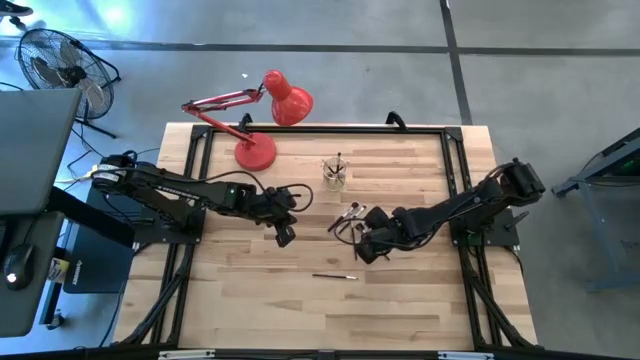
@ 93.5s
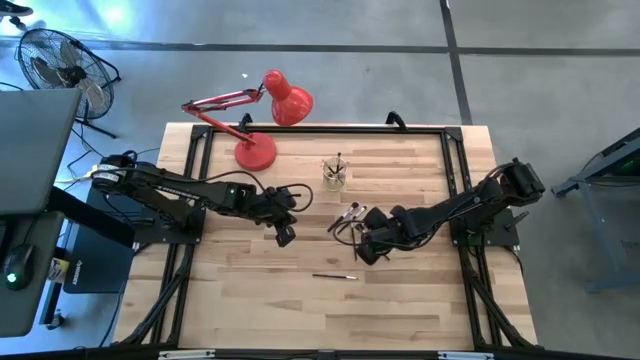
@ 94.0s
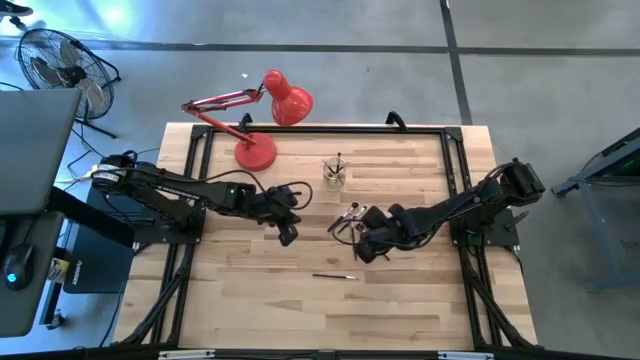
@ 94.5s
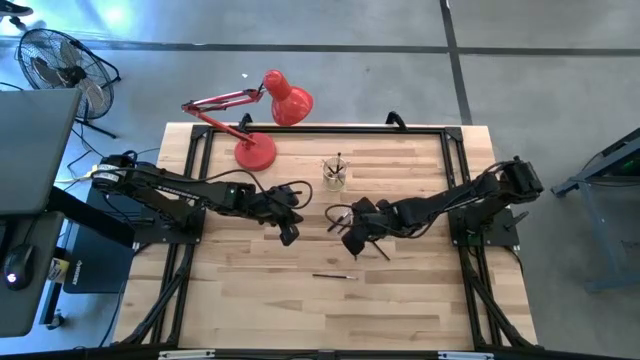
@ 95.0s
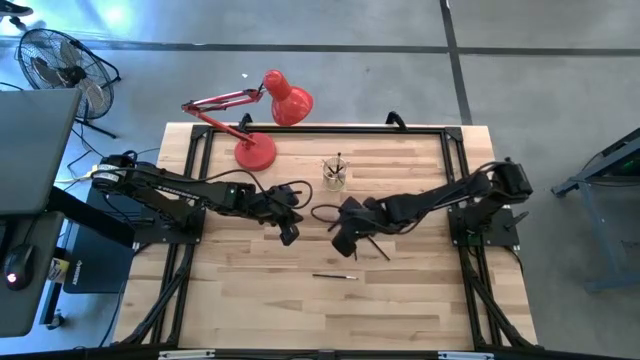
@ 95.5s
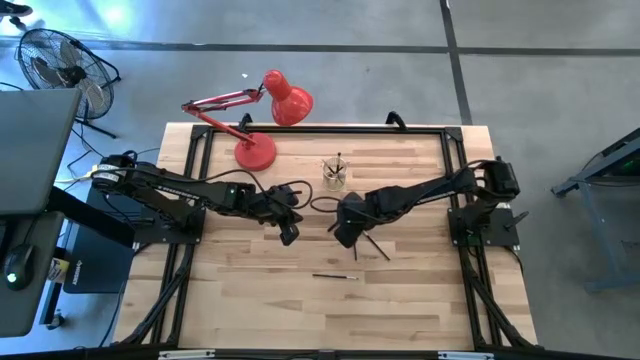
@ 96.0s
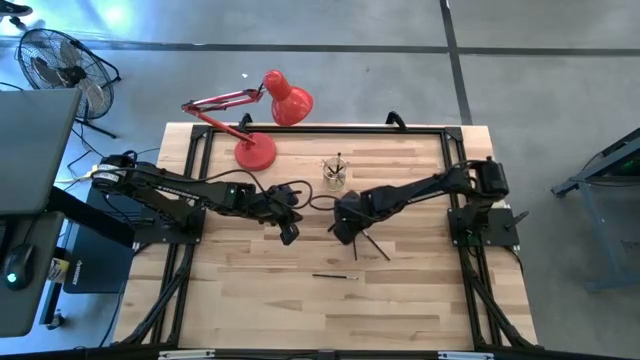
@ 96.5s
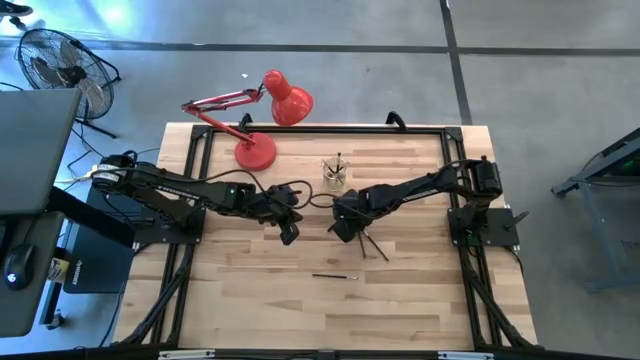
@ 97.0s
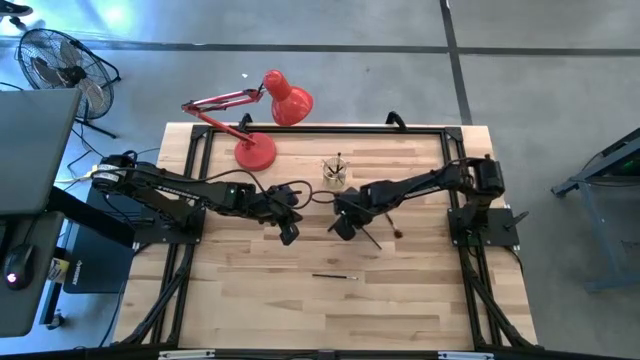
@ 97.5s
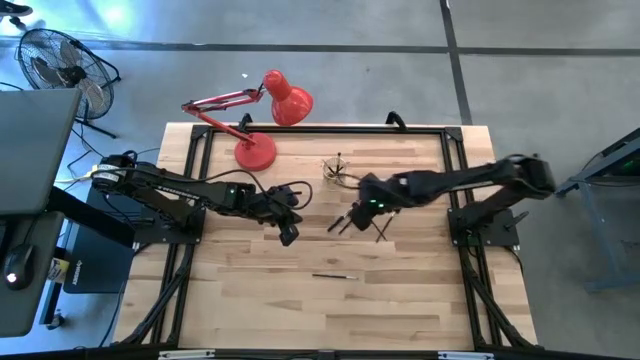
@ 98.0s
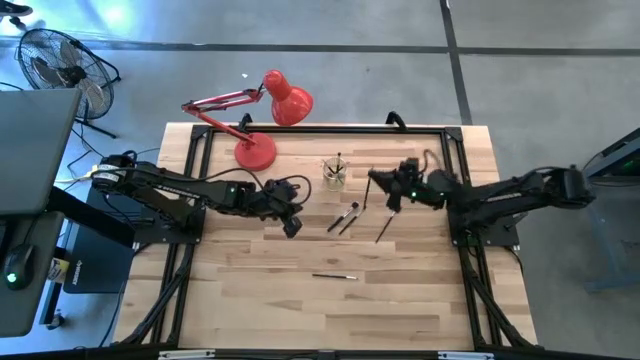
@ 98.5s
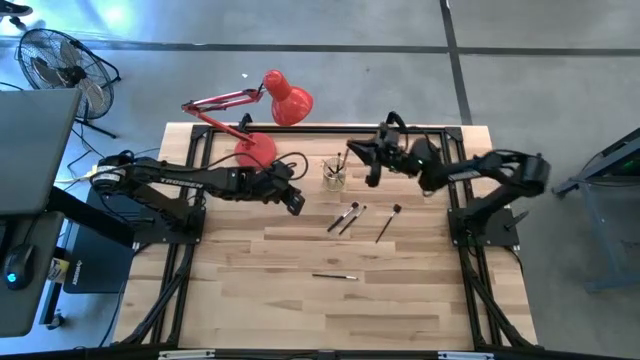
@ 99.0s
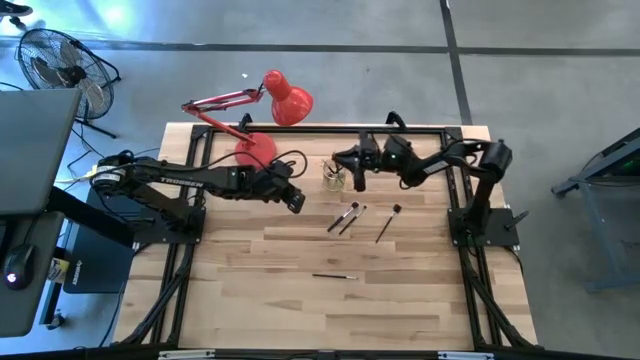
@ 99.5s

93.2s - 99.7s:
Task: Put items in baskets/containers
Put the makeup brush into the wire bin

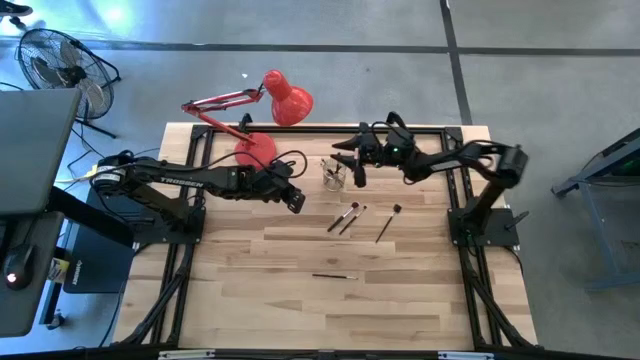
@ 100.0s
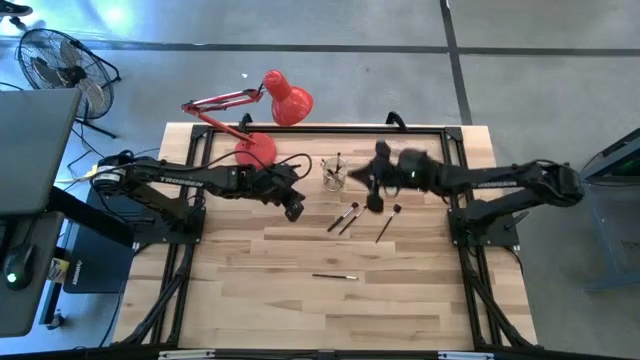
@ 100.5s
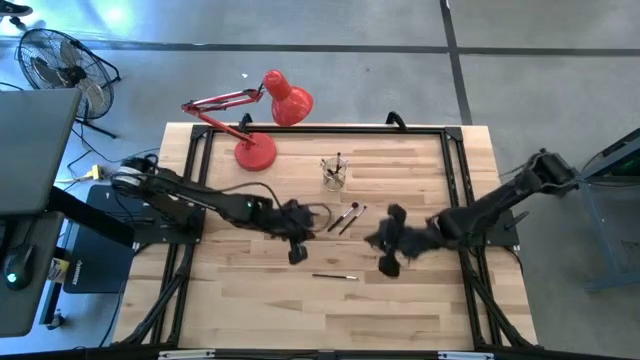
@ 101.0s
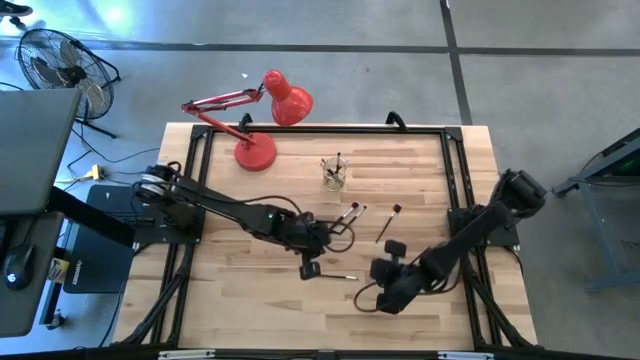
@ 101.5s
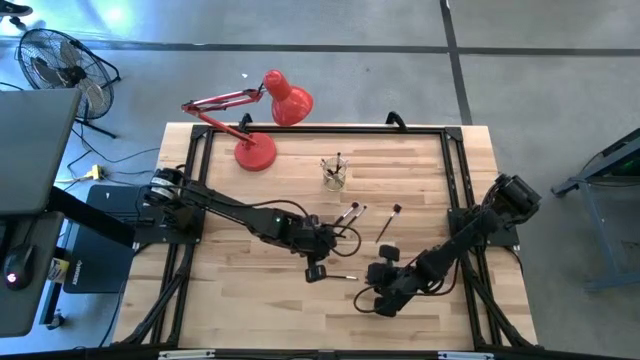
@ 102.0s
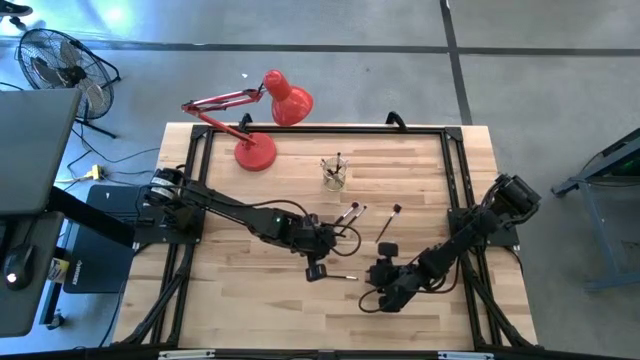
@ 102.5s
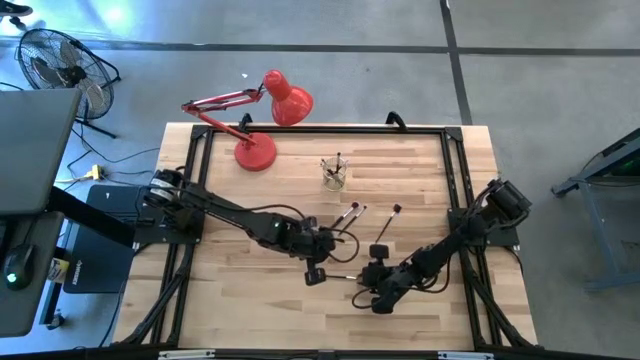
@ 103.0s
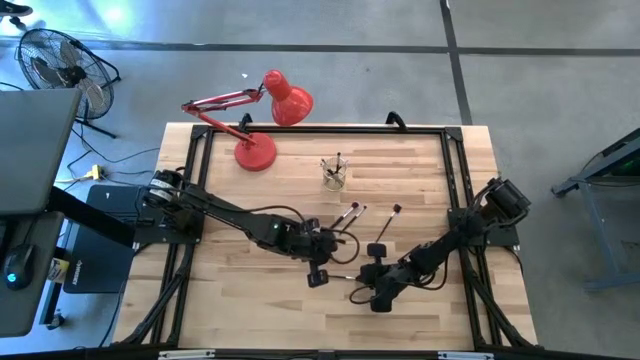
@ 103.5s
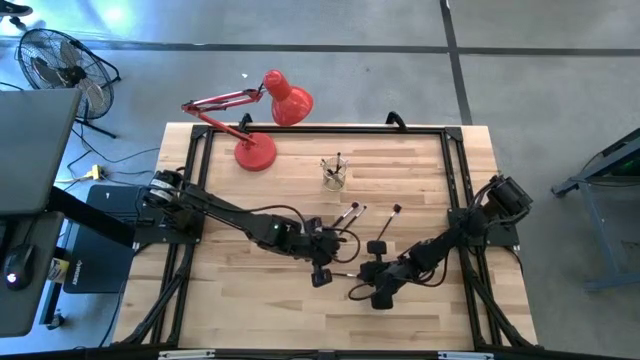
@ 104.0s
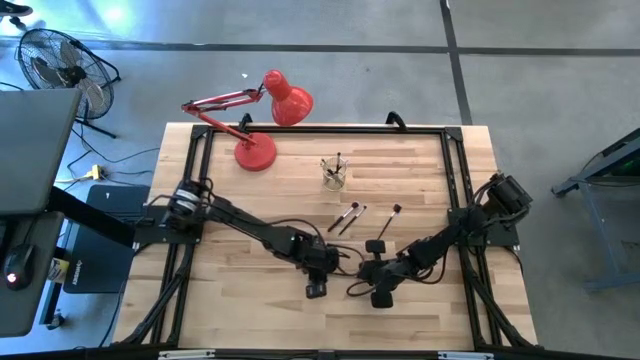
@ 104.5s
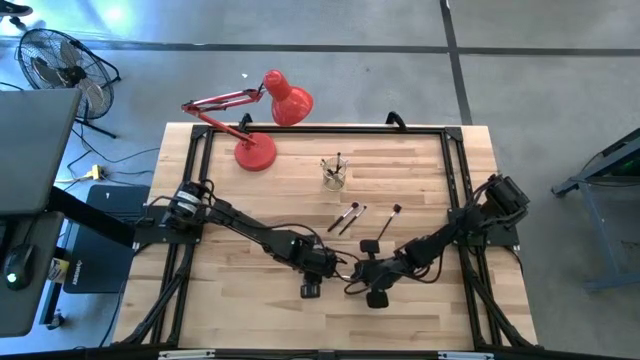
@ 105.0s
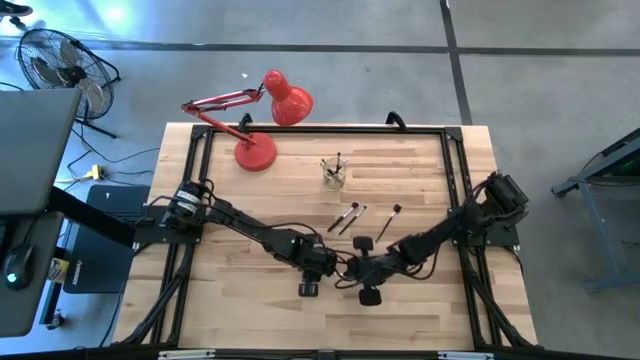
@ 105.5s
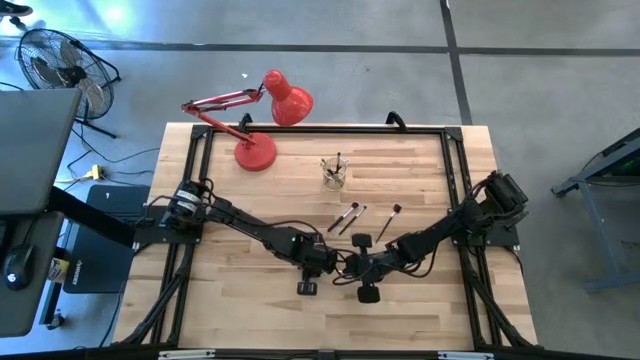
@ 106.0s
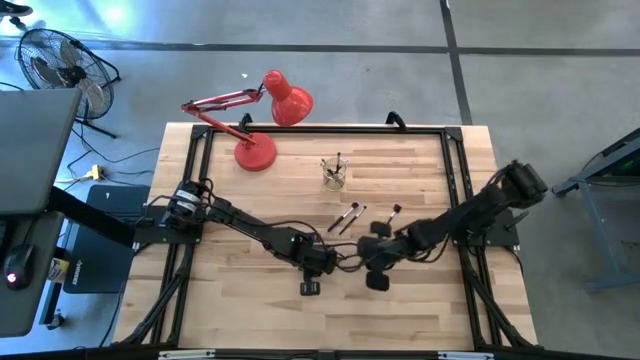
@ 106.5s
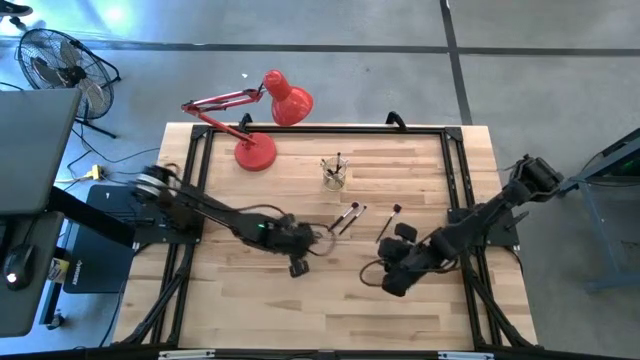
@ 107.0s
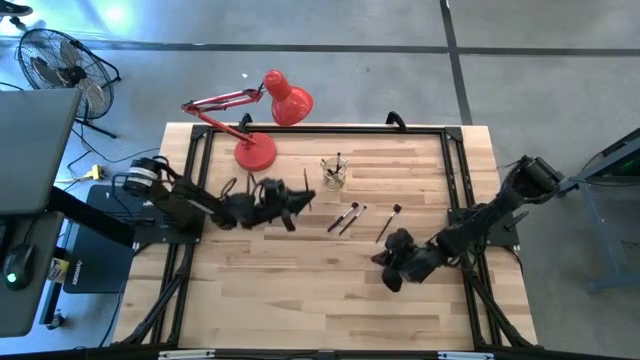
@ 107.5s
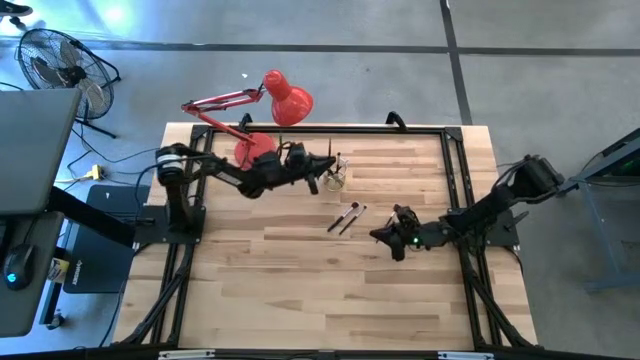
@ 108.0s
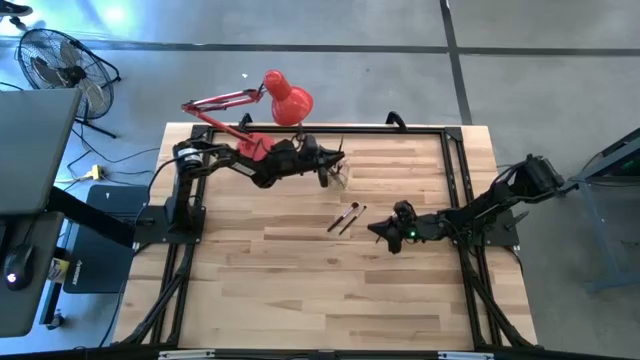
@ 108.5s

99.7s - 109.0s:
Put the makeup brush into the wire bin

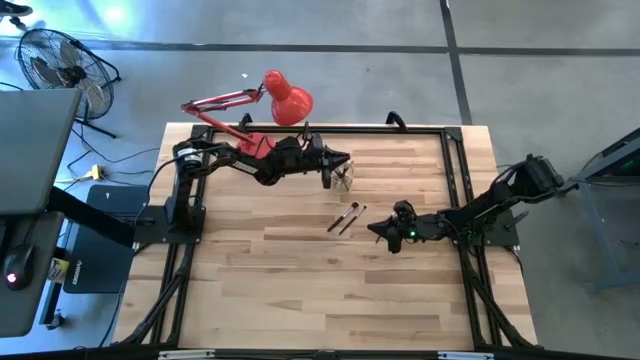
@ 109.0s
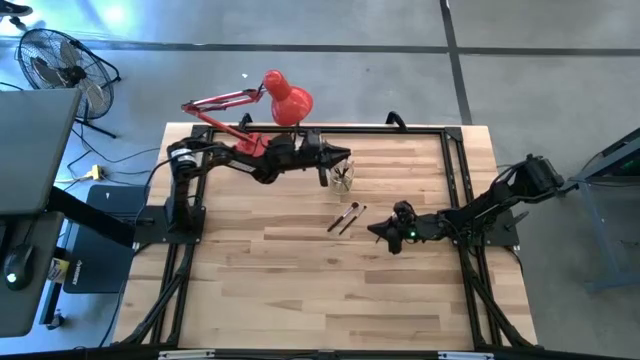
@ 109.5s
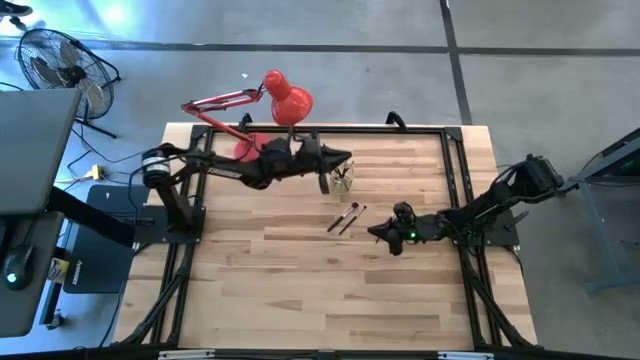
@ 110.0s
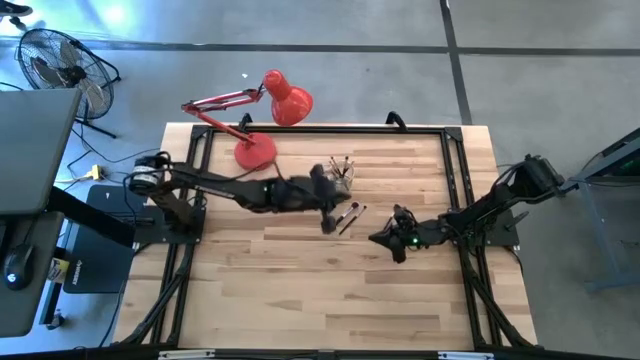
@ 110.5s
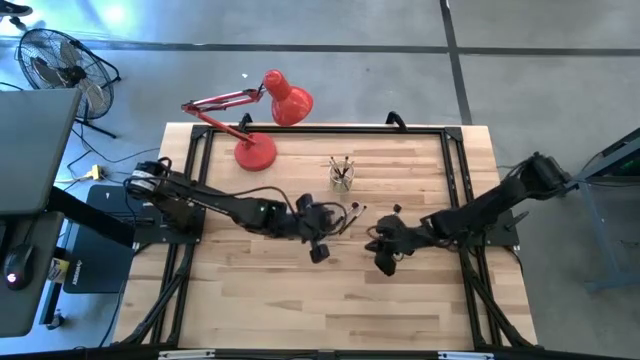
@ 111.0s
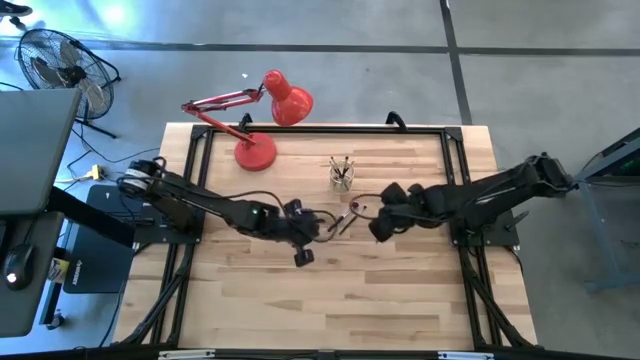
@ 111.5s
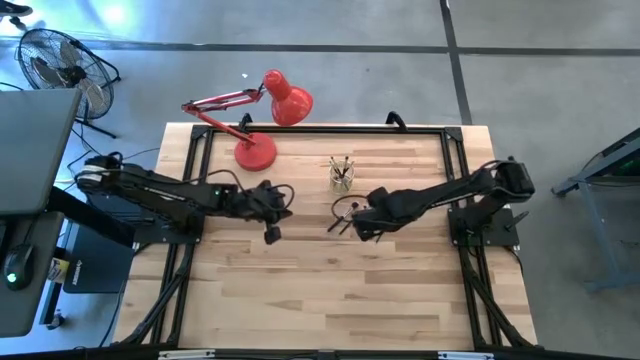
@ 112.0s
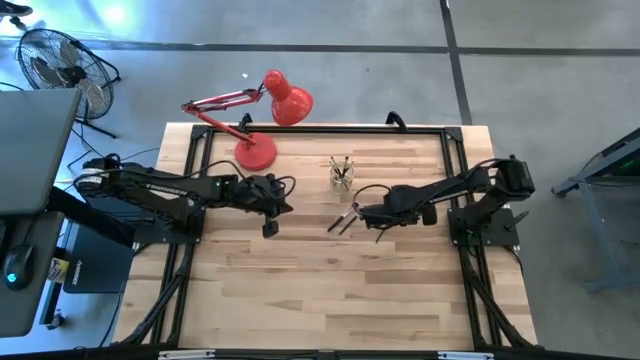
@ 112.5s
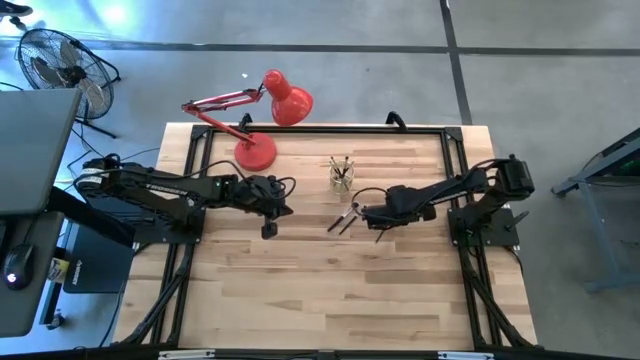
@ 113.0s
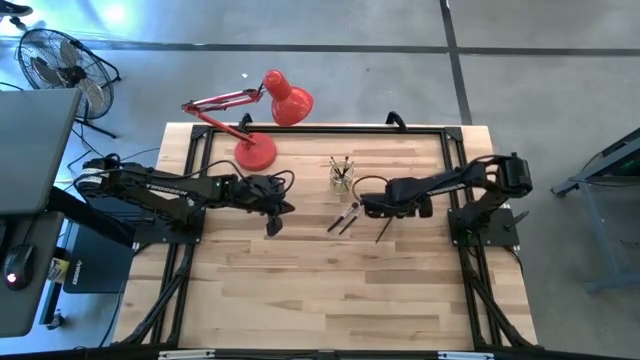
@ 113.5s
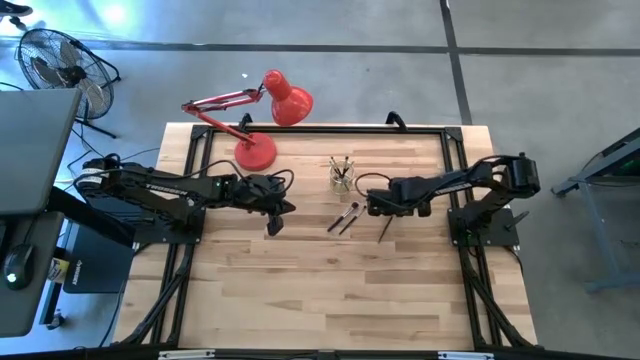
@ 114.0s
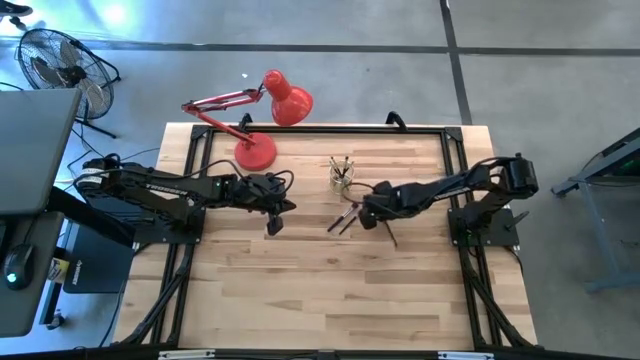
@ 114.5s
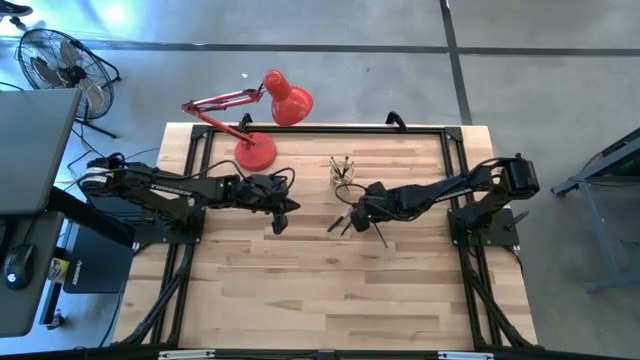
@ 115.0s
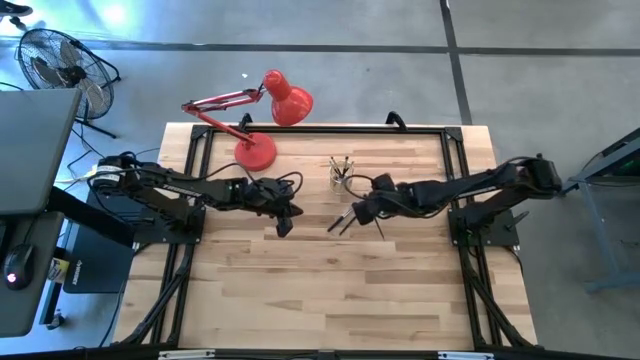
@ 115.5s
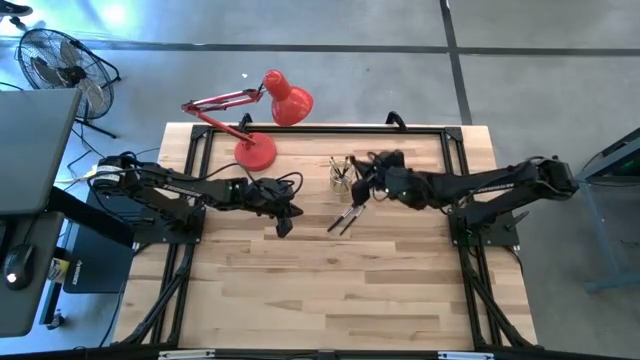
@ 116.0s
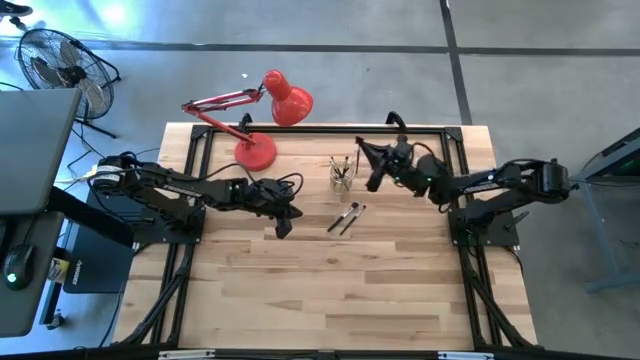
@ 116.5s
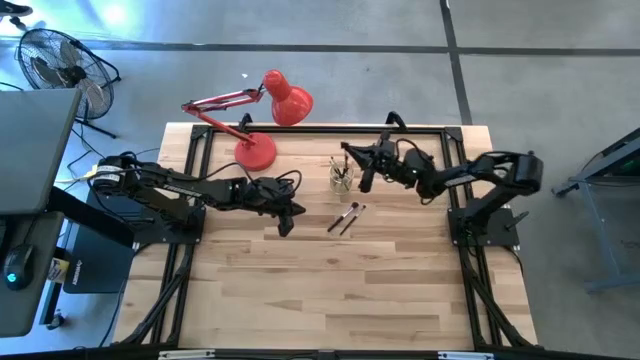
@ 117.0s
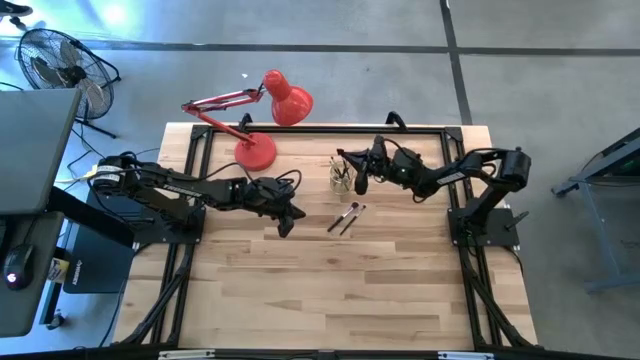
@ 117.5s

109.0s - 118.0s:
Put the makeup brush into the wire bin
